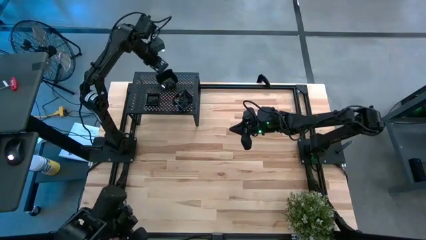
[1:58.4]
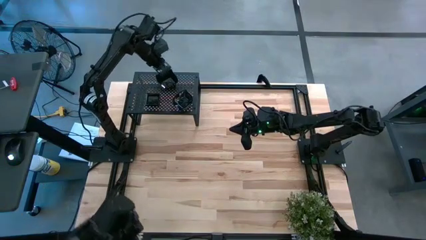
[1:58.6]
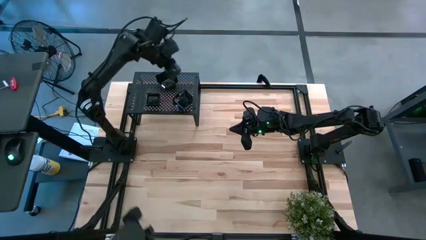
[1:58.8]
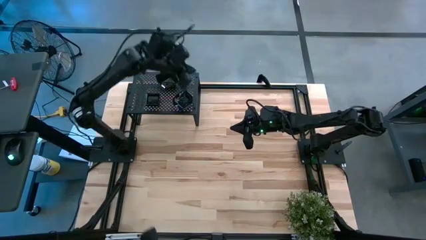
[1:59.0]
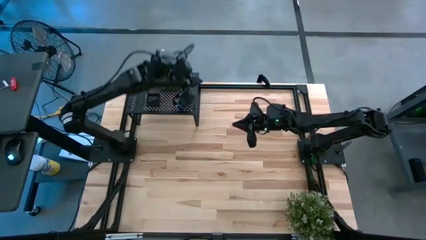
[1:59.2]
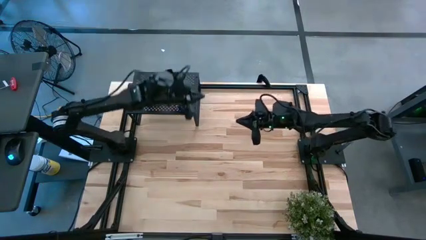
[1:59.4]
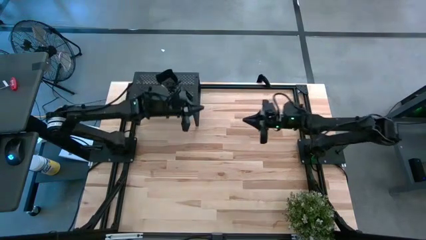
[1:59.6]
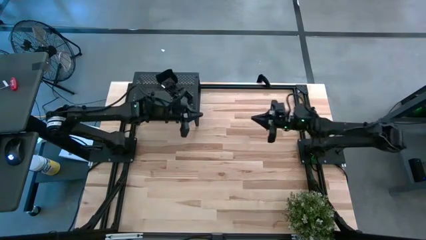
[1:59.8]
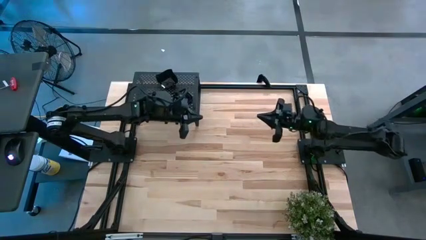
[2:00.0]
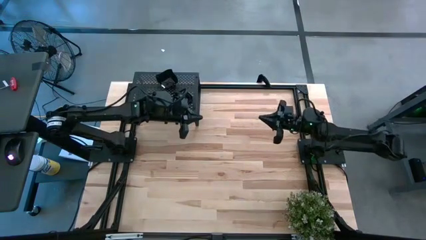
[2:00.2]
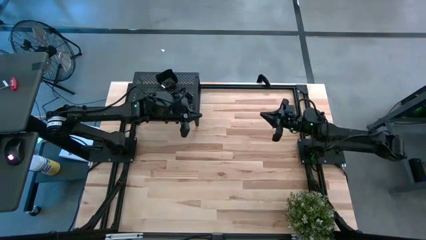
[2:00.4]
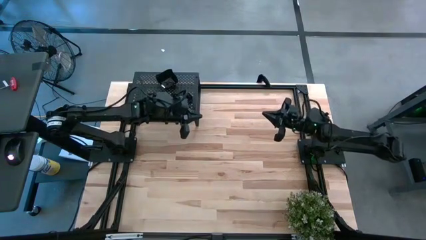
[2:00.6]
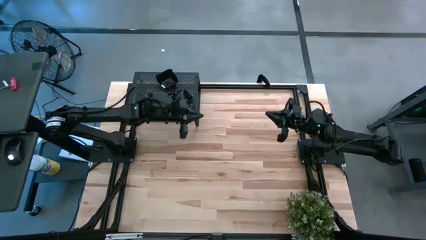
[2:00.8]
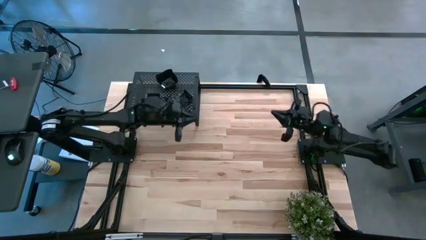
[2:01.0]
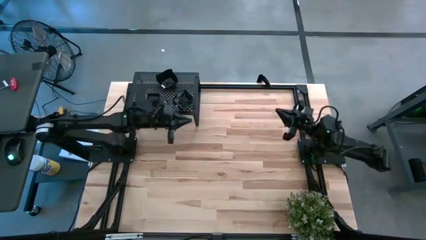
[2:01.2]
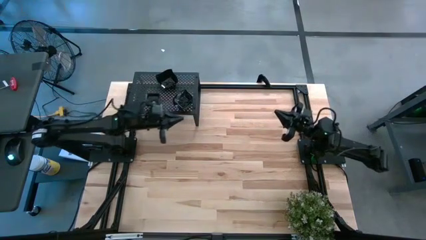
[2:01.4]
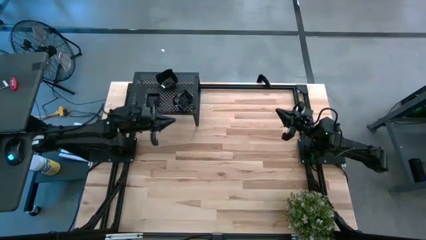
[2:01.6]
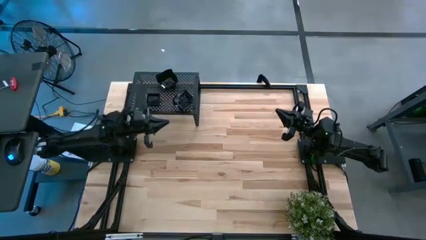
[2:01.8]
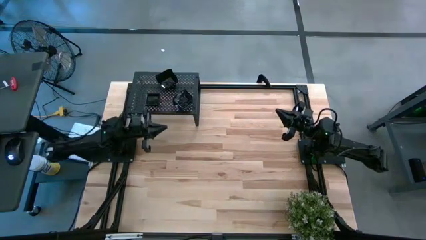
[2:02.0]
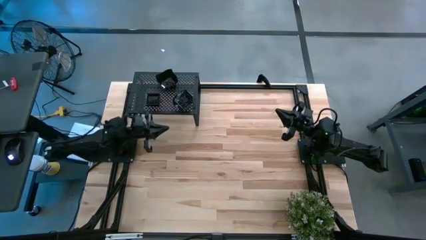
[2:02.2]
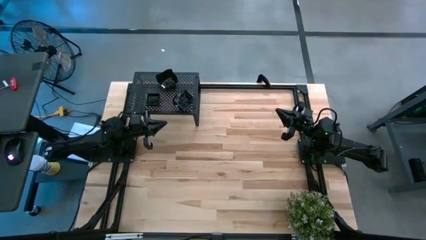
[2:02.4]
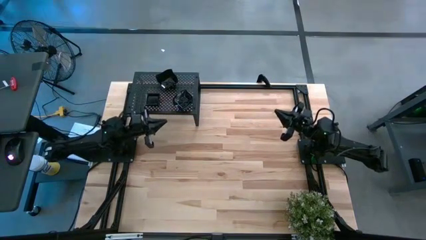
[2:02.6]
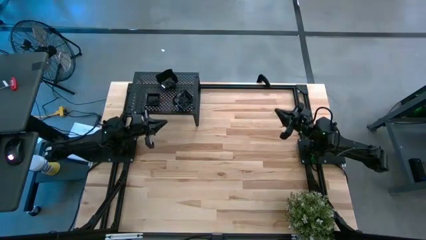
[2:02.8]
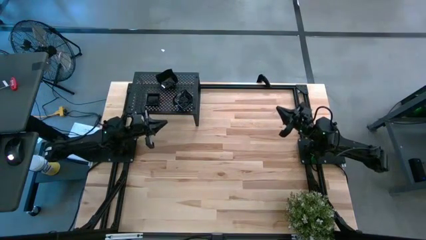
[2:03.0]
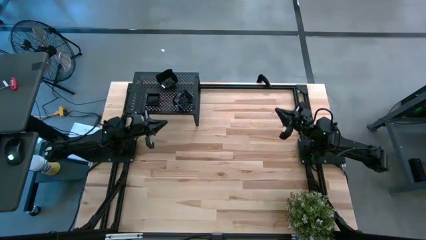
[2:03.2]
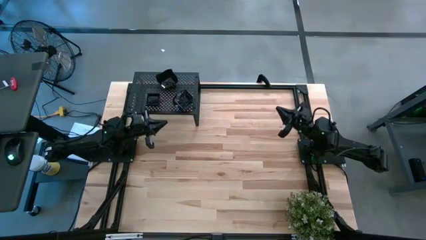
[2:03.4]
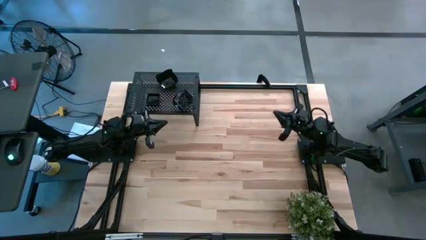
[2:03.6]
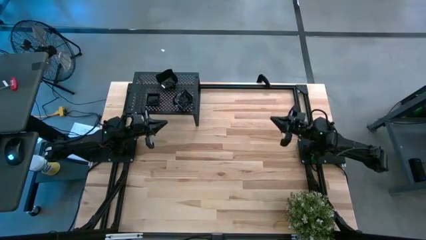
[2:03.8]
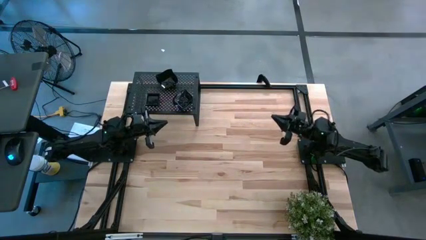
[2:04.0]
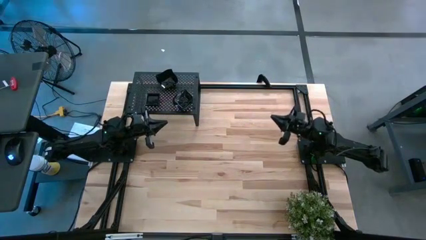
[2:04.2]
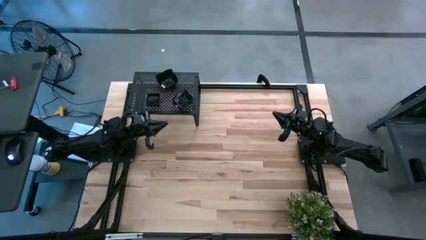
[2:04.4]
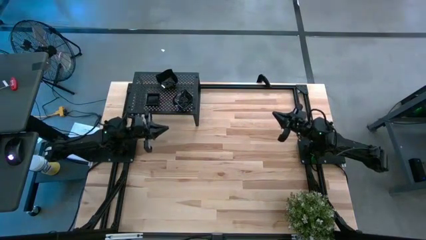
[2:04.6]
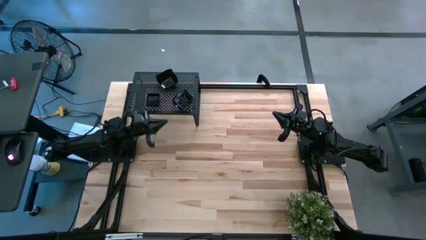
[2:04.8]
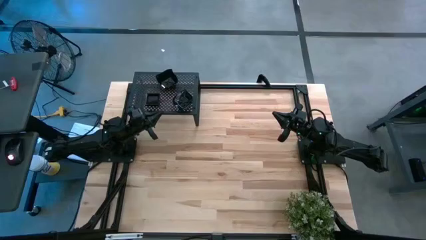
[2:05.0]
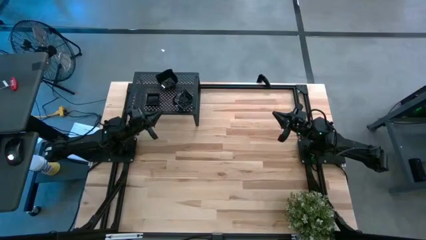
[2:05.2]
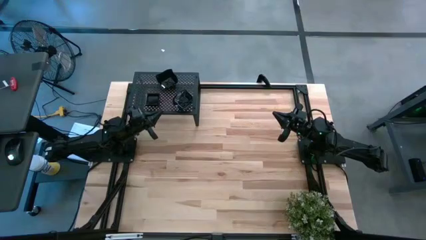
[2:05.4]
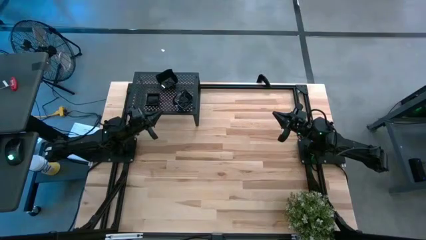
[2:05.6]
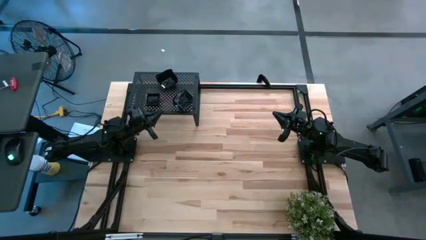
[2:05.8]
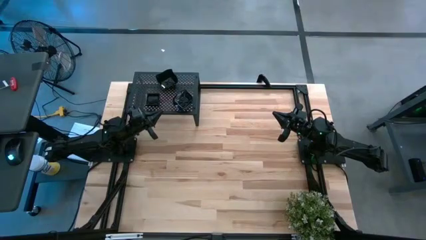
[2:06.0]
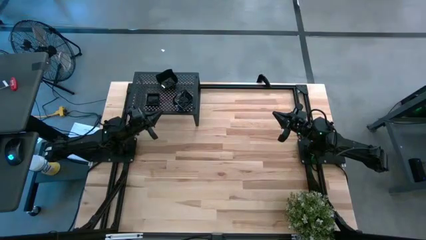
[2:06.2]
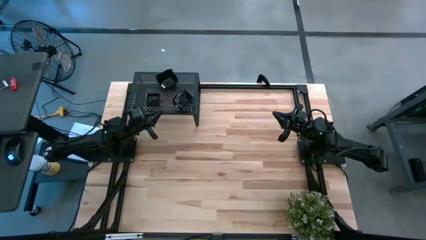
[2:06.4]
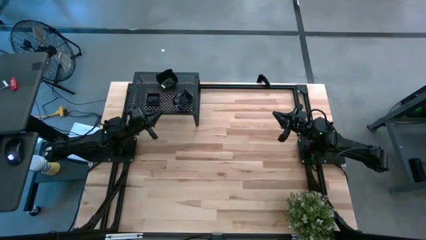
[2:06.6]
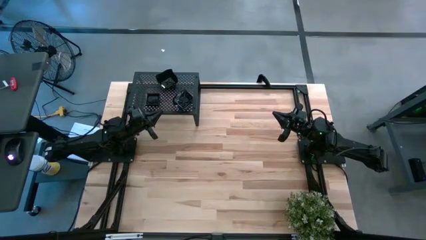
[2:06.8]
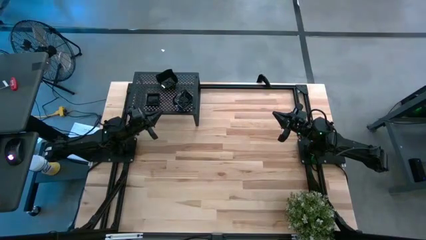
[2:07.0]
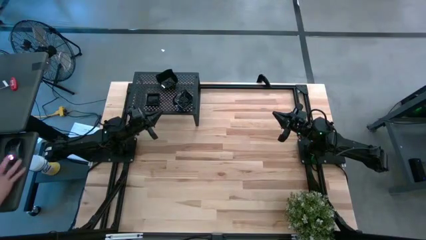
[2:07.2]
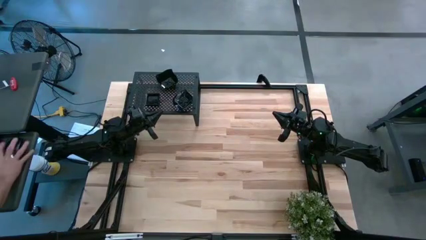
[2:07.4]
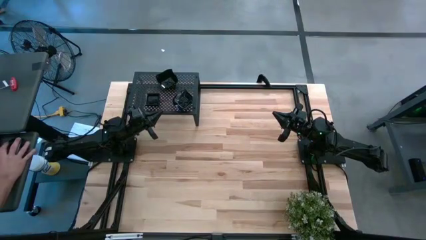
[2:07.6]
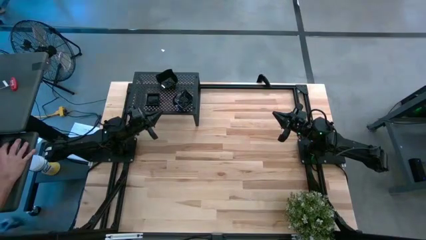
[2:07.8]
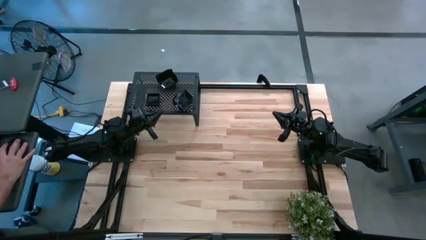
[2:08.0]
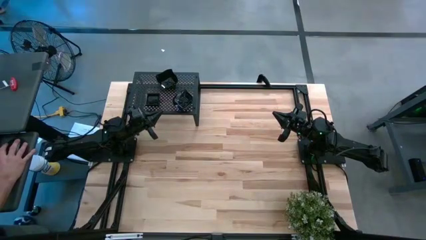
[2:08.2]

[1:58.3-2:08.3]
Task: Pick & Place Mini shaped plates
Return to Home Position

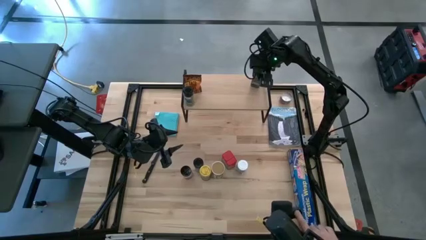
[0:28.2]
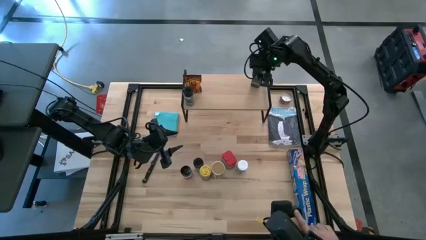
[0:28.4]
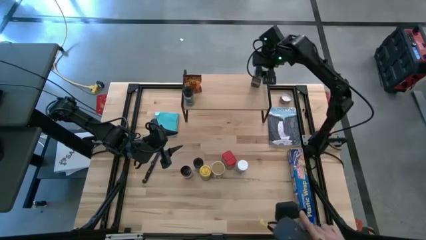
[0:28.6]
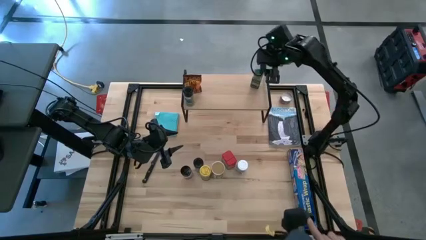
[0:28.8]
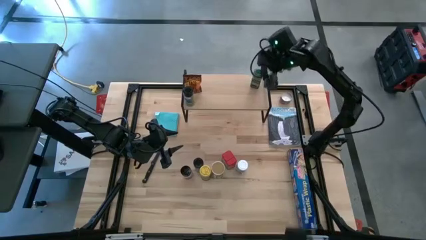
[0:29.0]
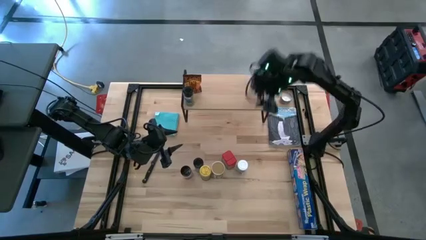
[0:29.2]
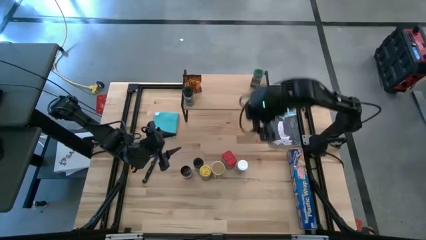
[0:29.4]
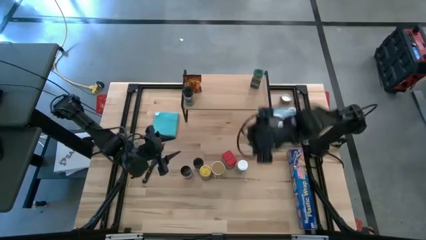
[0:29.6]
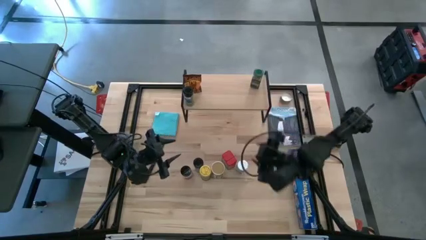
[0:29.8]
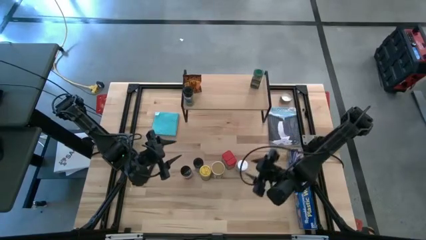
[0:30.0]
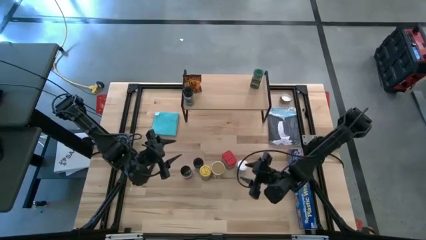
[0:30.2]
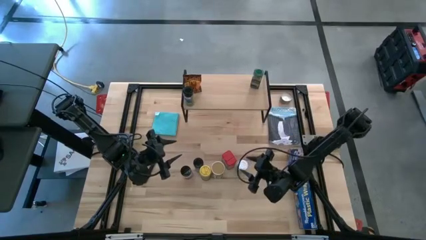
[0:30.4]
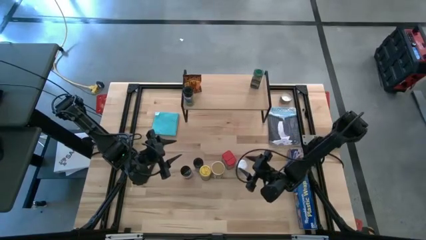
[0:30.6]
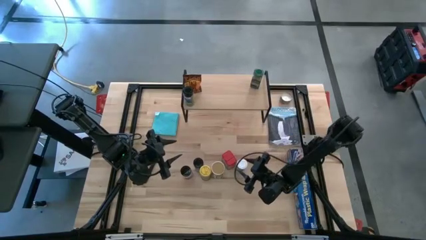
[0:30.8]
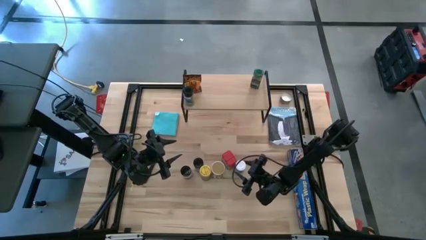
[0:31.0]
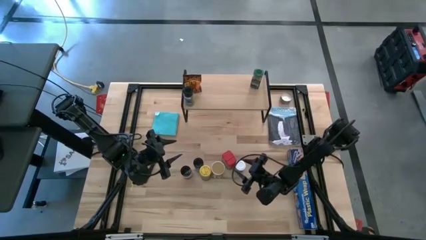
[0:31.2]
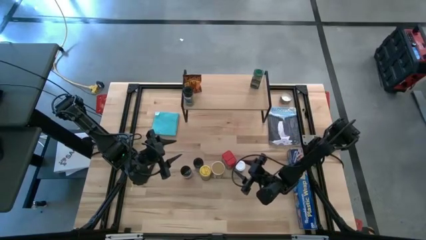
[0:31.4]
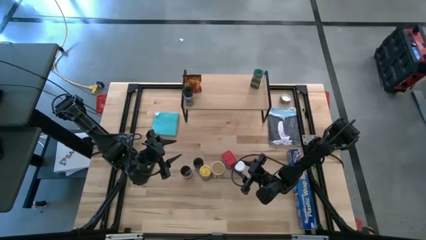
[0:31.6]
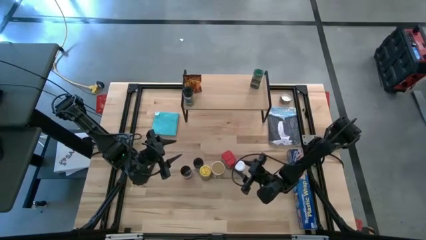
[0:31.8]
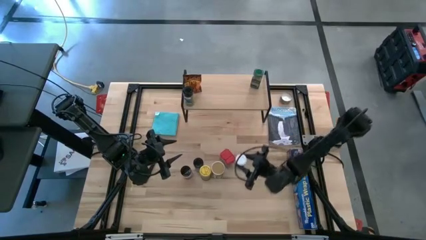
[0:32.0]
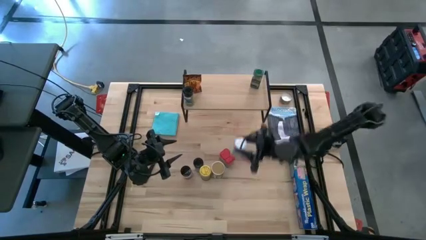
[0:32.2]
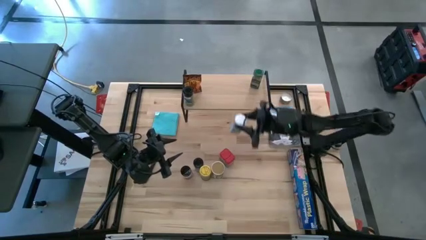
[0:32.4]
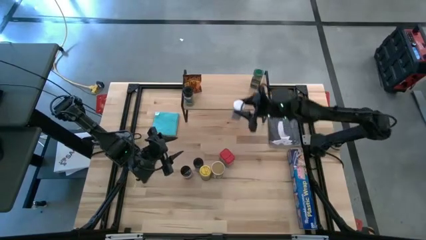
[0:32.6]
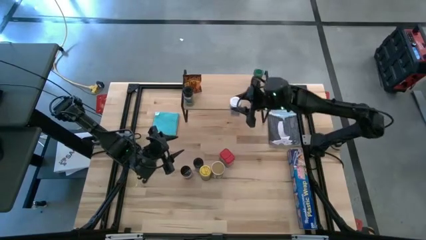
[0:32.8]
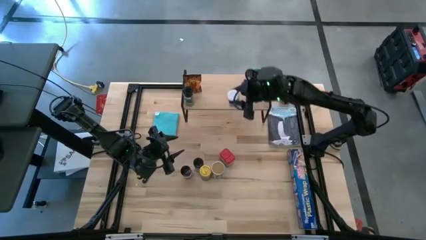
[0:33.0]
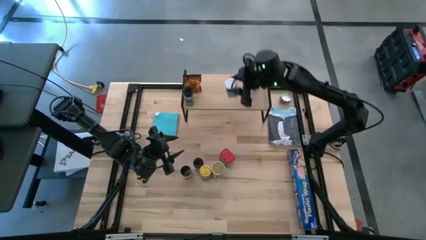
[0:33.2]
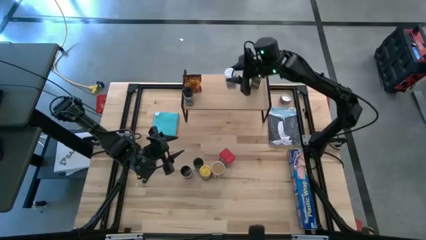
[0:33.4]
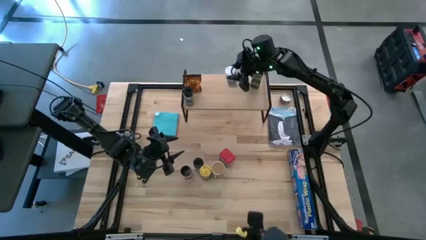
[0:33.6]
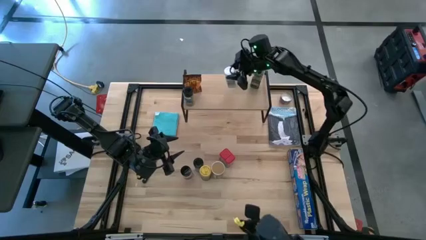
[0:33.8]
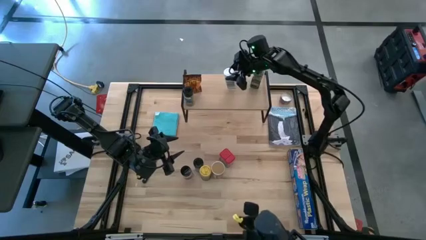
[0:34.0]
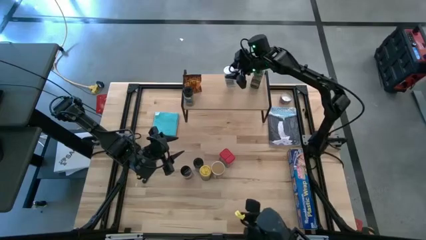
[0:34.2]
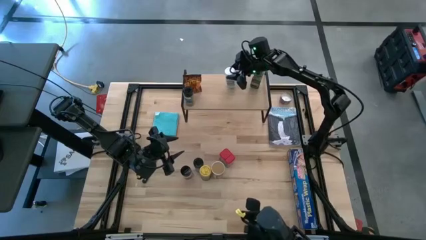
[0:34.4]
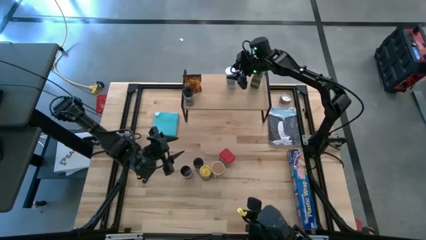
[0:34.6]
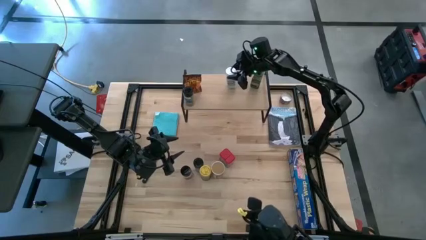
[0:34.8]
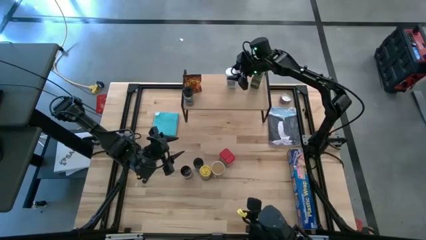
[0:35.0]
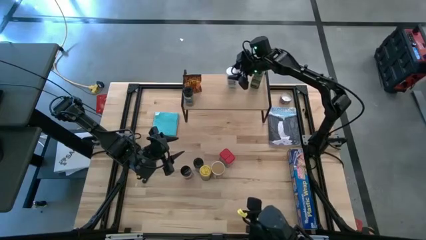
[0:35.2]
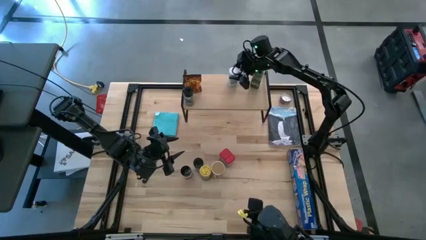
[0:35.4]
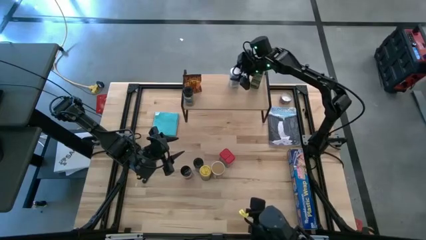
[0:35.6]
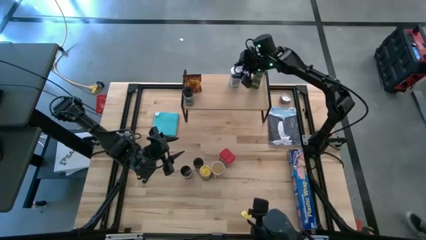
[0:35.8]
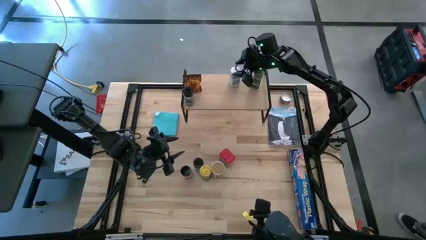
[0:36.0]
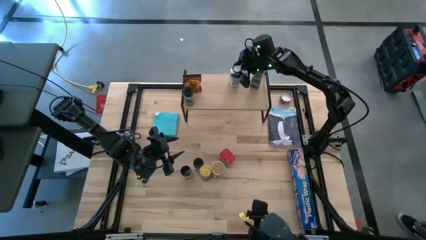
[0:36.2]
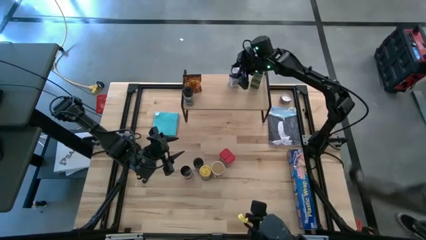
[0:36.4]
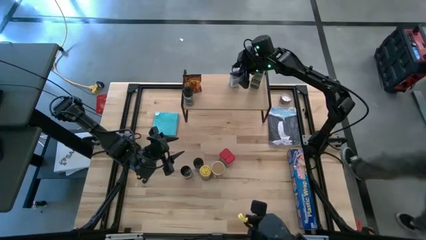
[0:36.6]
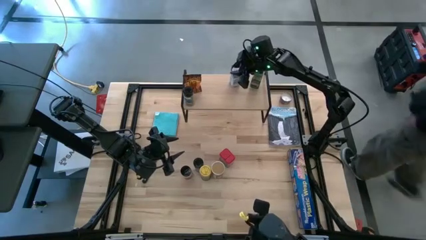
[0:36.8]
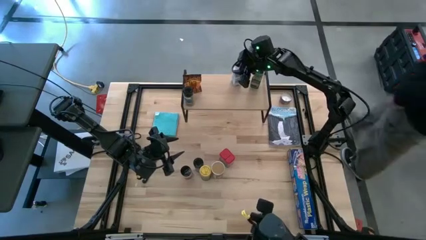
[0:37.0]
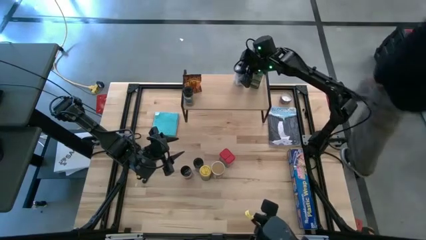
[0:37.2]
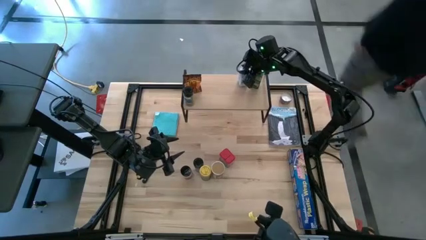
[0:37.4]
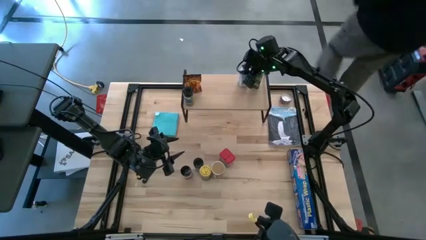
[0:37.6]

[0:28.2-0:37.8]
Task: Shelf spices
Put the white seasoning bottle on the shelf
